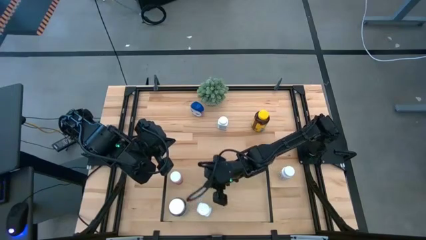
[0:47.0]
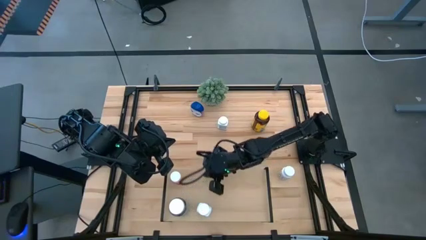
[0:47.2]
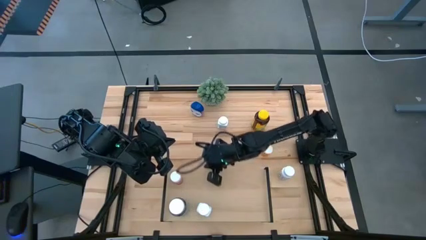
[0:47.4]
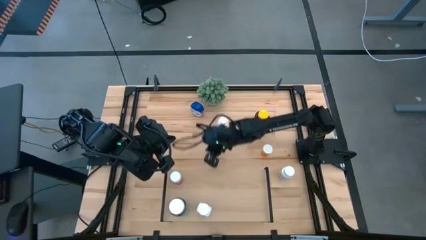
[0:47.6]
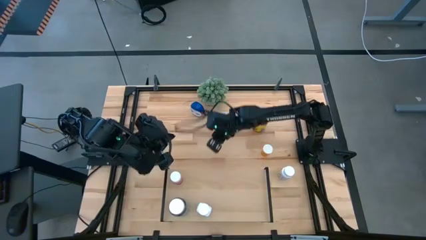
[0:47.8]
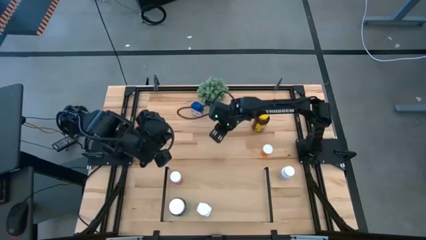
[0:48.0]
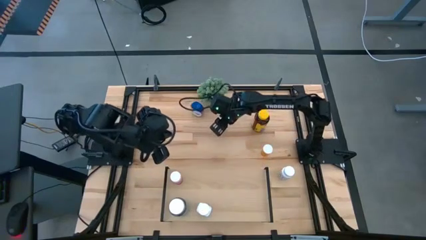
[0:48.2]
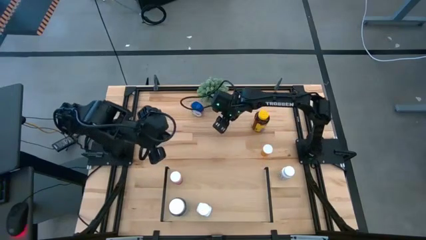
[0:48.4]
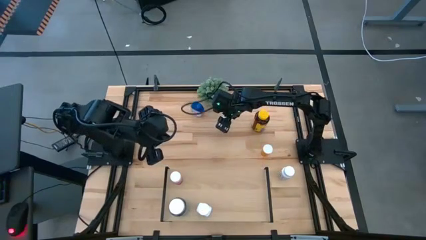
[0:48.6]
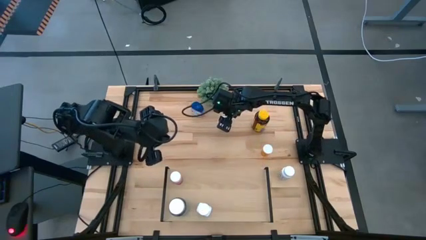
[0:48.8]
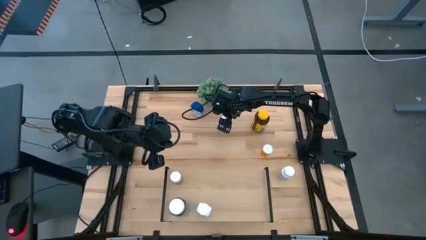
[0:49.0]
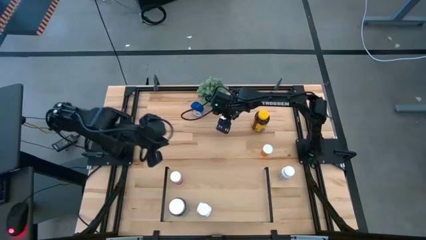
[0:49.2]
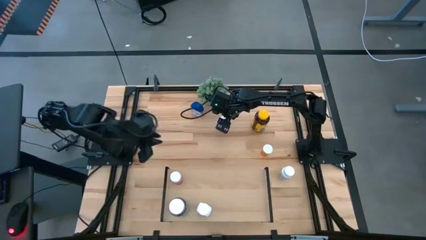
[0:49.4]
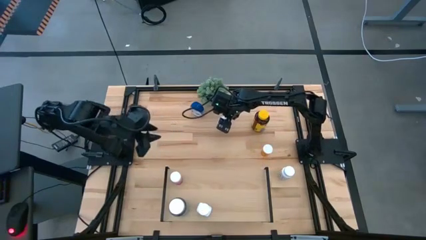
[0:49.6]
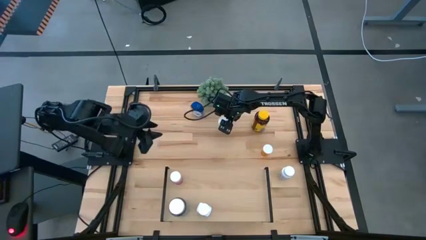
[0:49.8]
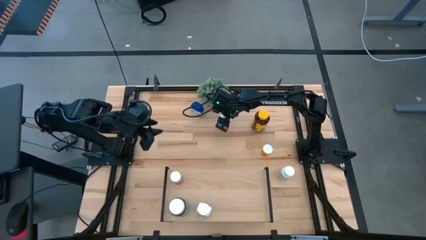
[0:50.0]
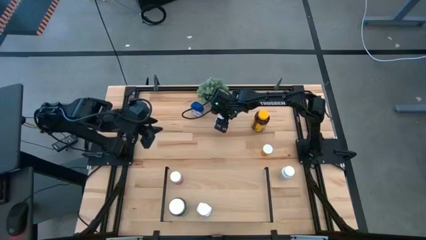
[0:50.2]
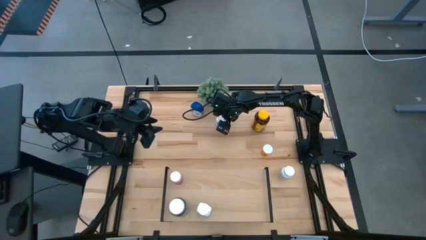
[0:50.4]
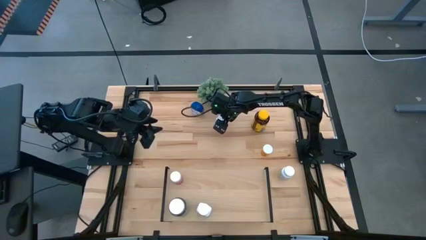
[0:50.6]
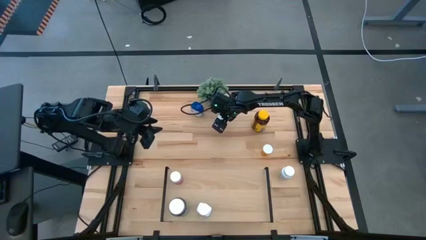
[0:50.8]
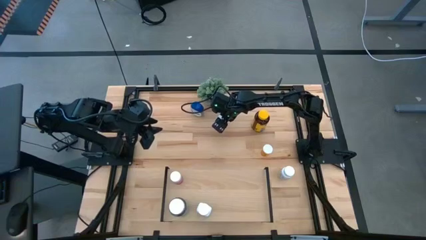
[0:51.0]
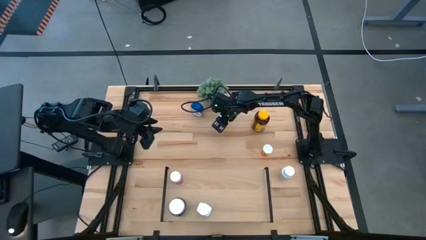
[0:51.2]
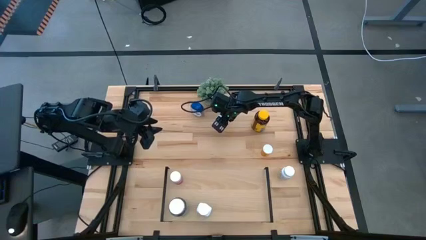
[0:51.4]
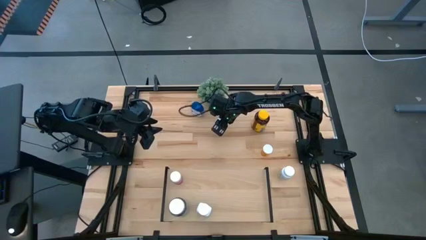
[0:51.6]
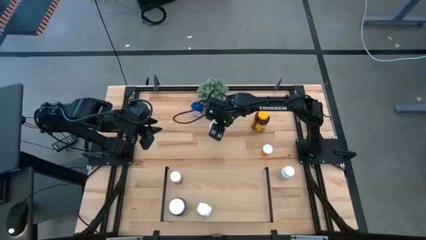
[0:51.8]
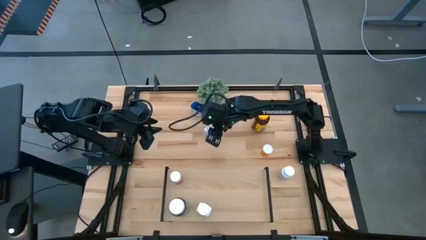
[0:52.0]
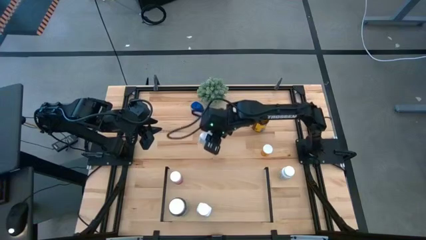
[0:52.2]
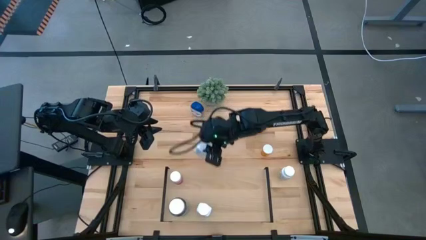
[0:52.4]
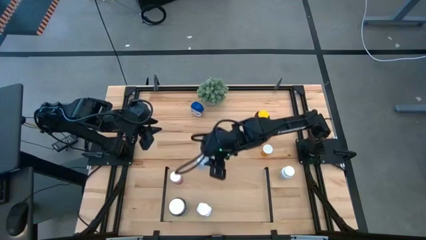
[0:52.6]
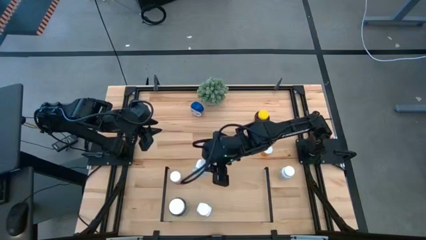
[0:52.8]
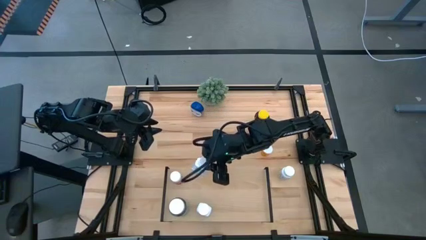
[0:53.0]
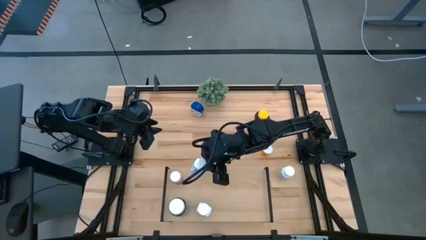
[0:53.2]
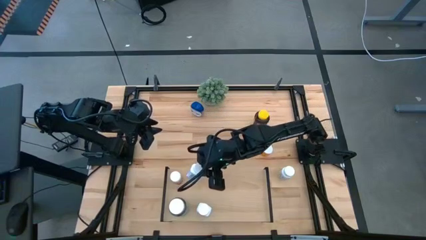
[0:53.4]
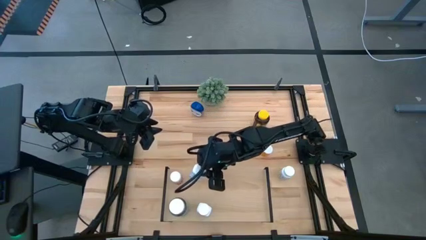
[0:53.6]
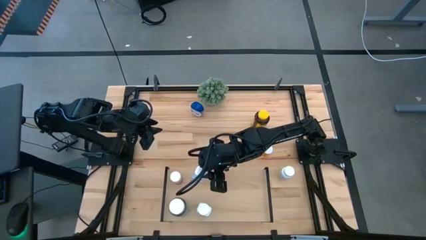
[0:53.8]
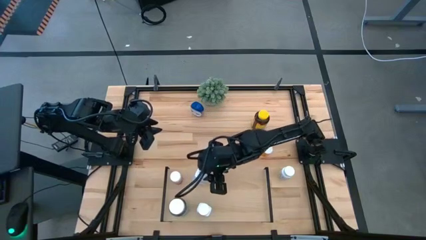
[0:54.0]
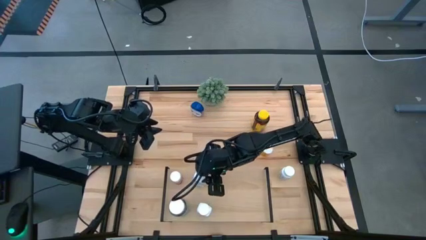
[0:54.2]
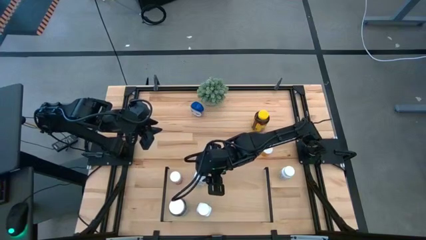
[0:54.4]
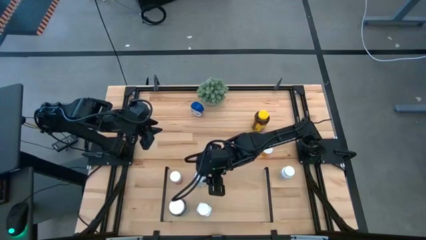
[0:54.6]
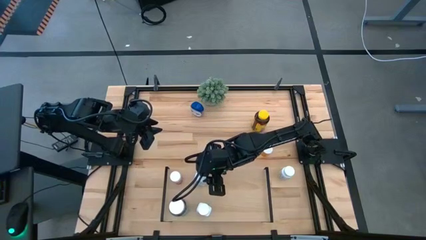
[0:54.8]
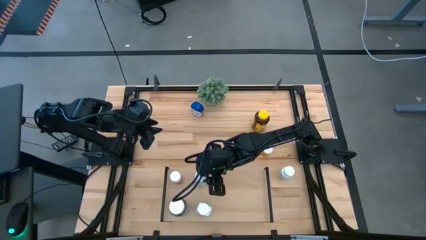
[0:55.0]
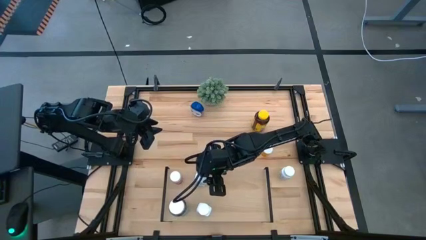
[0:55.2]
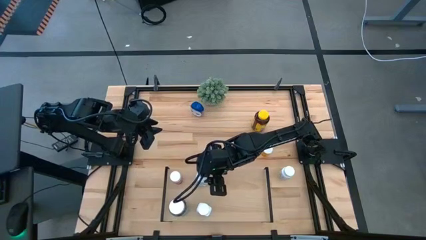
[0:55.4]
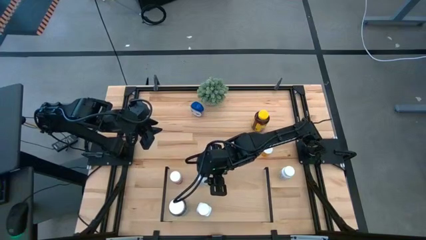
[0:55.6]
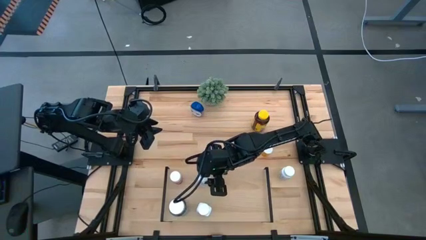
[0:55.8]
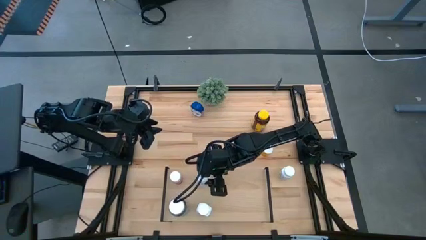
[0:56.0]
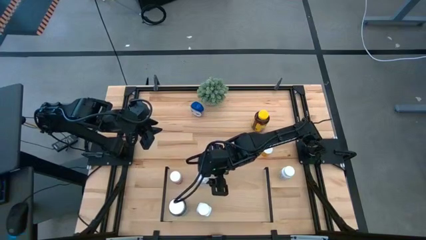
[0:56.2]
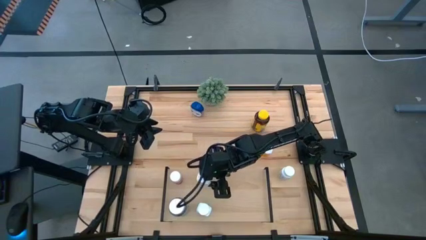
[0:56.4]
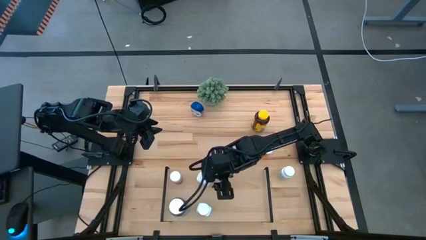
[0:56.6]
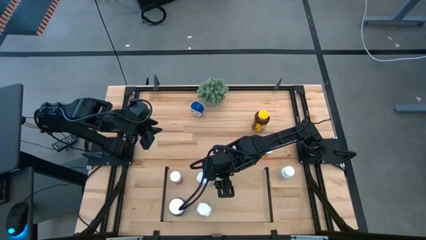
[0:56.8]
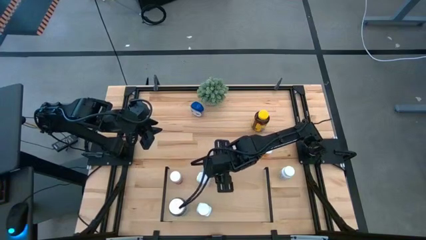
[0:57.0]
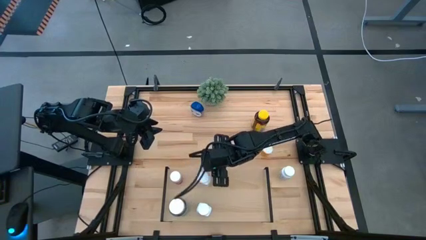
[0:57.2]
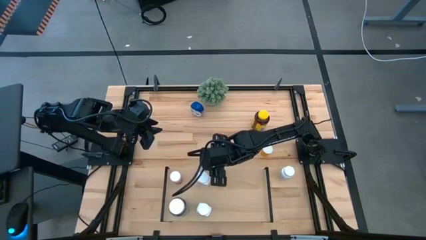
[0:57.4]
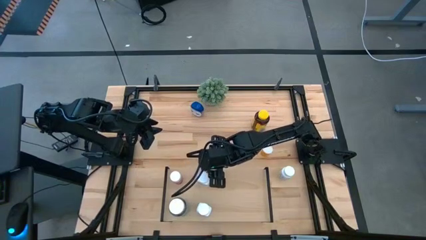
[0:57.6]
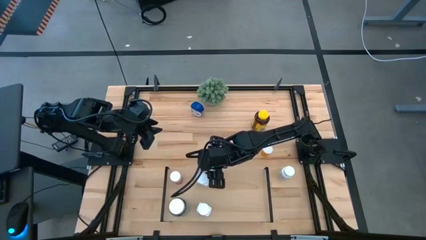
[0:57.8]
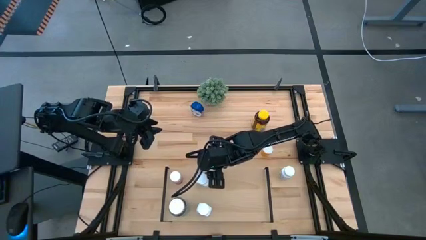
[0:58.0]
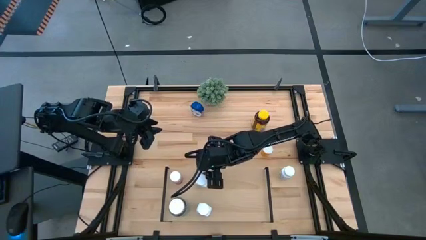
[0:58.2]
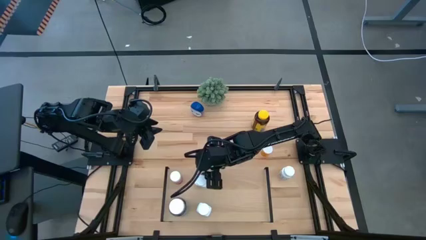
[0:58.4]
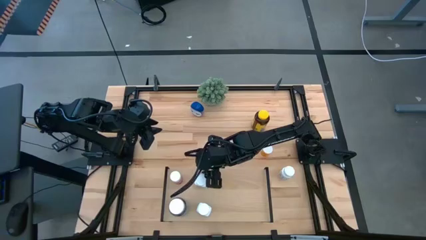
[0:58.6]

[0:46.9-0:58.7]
Task: Pick and place medicine bottles onto shelf by color
Put the left white pill bottle on the shelf
